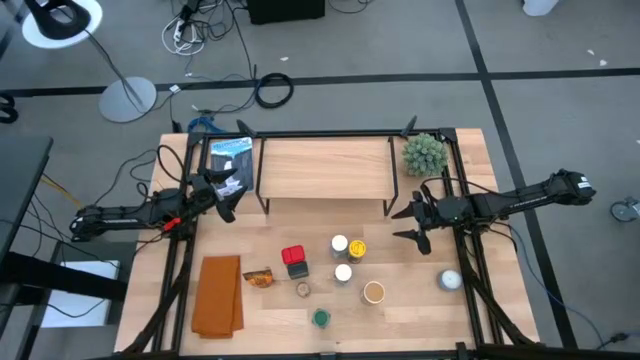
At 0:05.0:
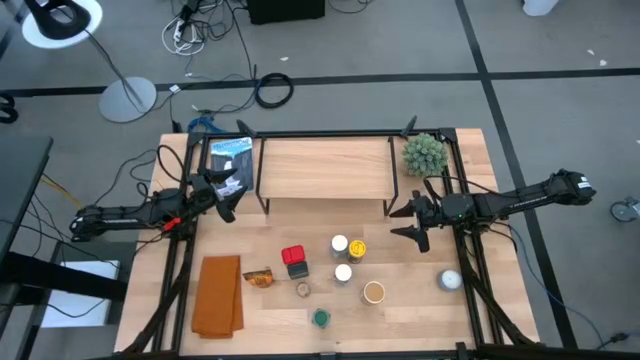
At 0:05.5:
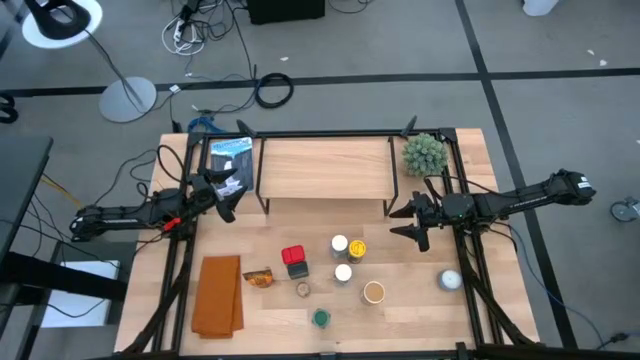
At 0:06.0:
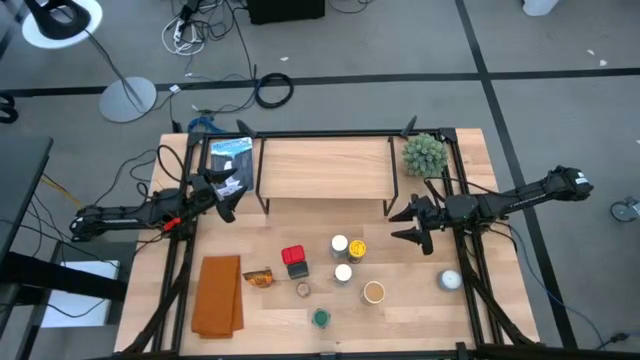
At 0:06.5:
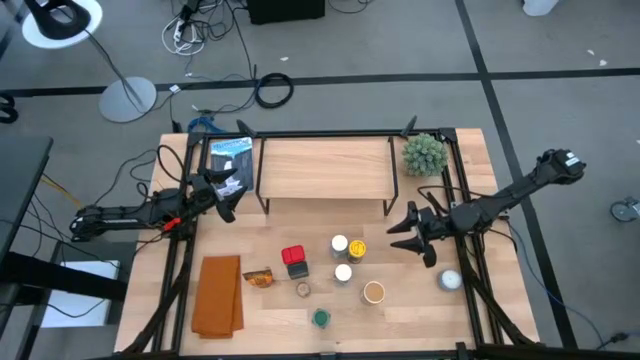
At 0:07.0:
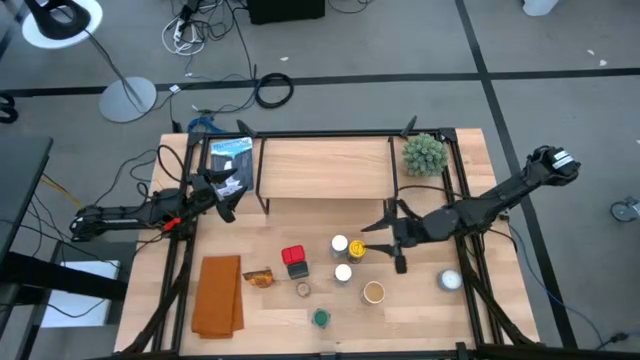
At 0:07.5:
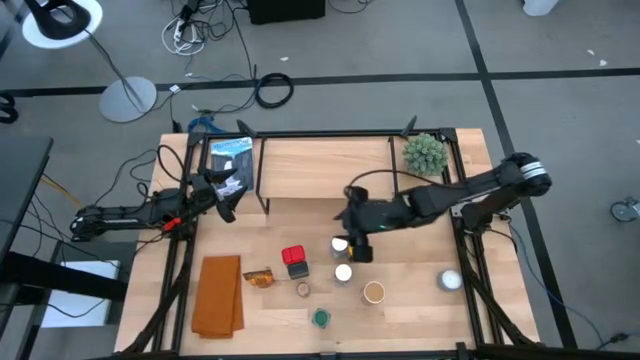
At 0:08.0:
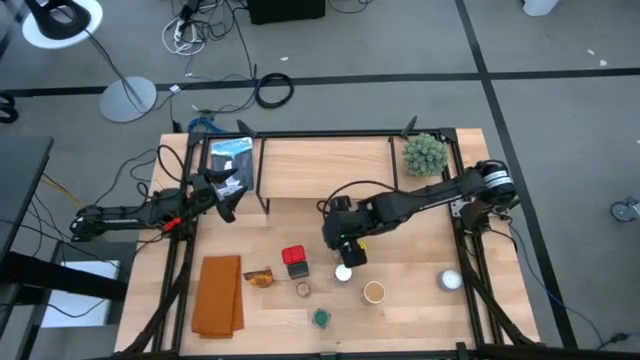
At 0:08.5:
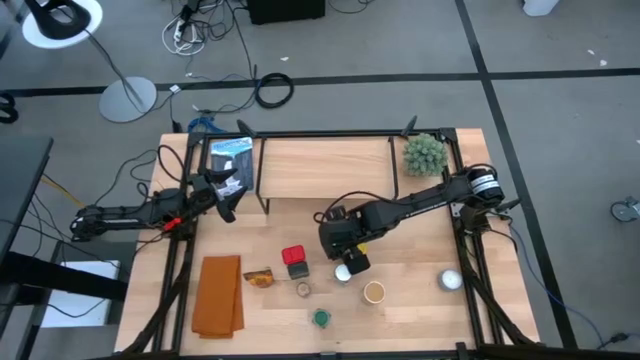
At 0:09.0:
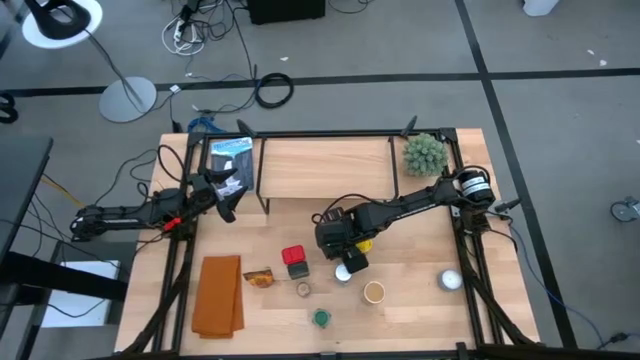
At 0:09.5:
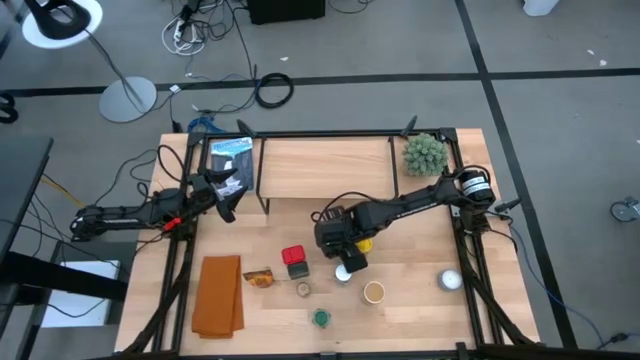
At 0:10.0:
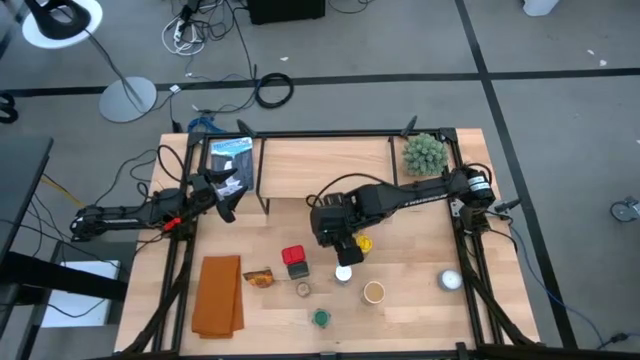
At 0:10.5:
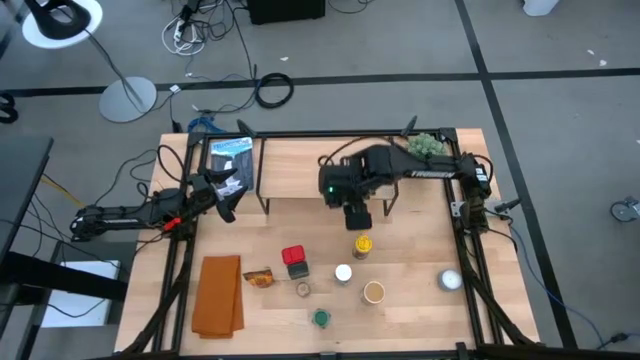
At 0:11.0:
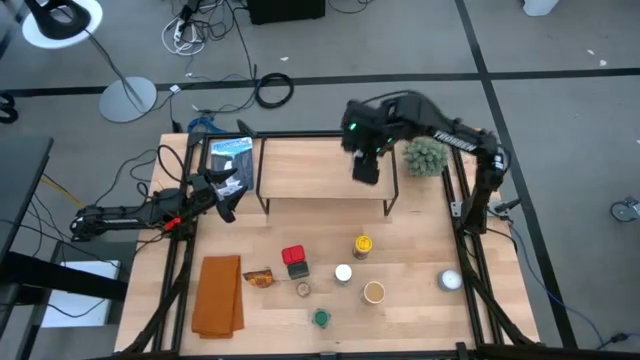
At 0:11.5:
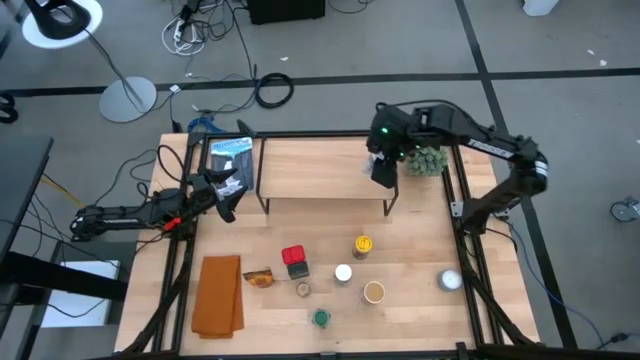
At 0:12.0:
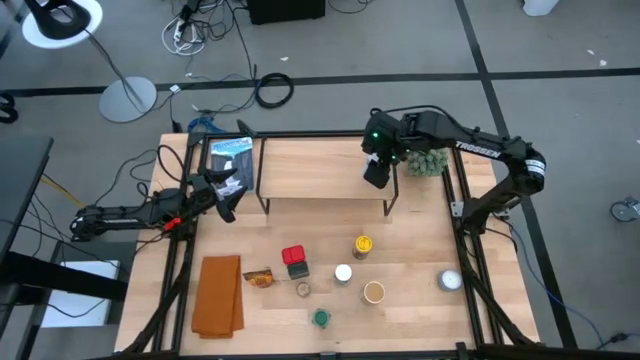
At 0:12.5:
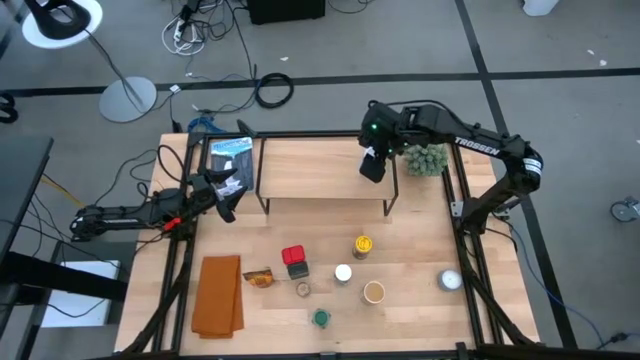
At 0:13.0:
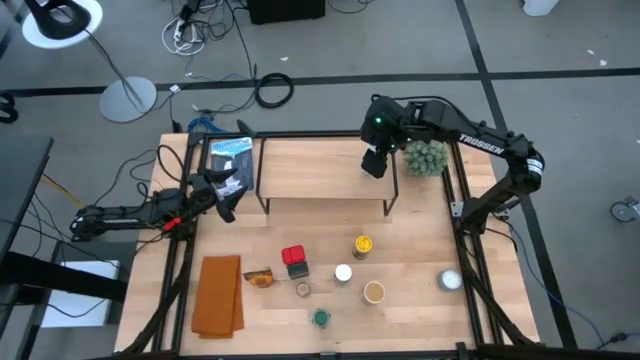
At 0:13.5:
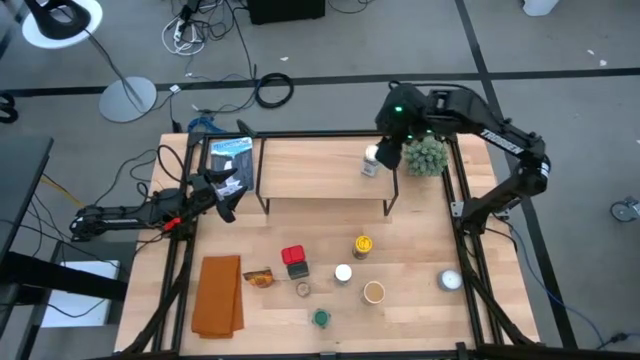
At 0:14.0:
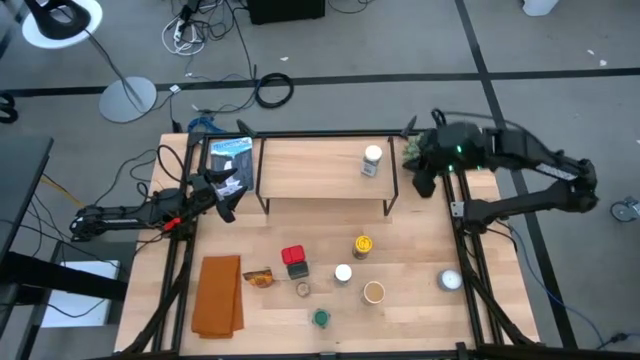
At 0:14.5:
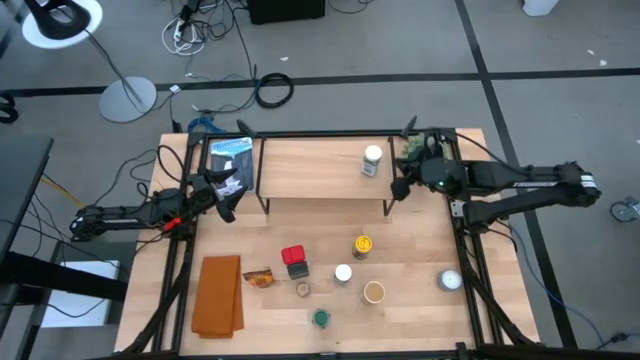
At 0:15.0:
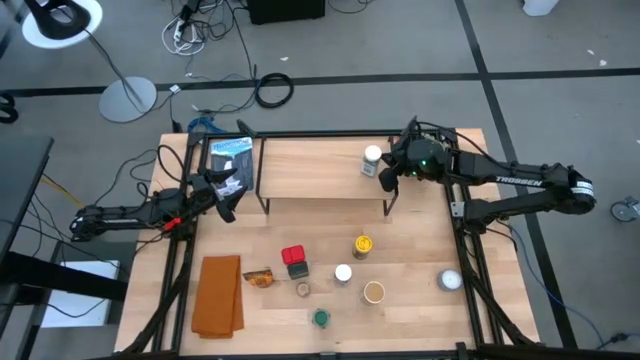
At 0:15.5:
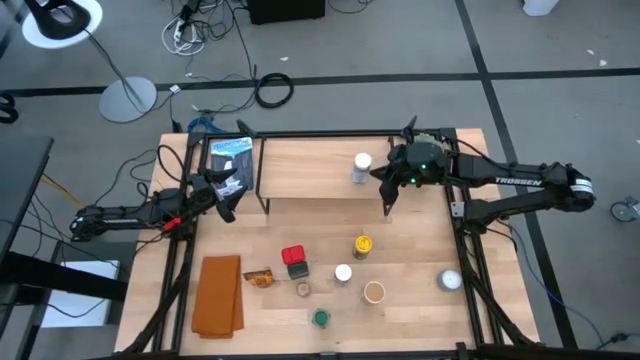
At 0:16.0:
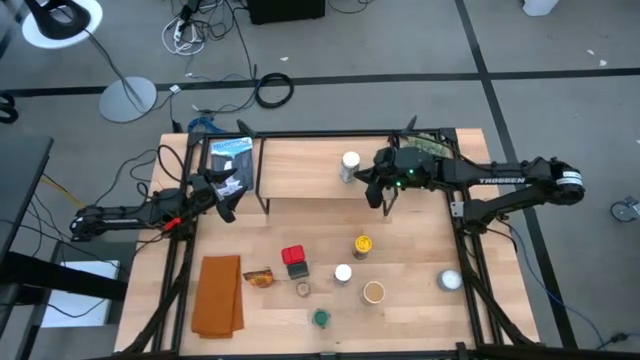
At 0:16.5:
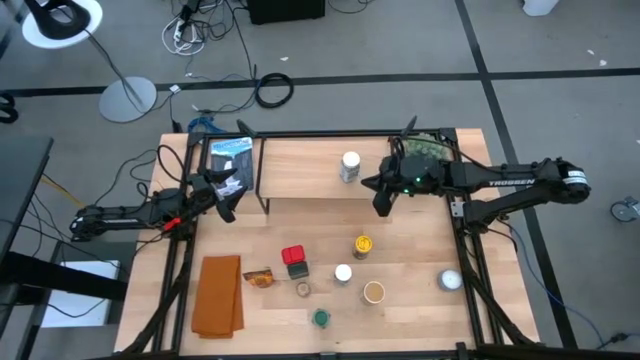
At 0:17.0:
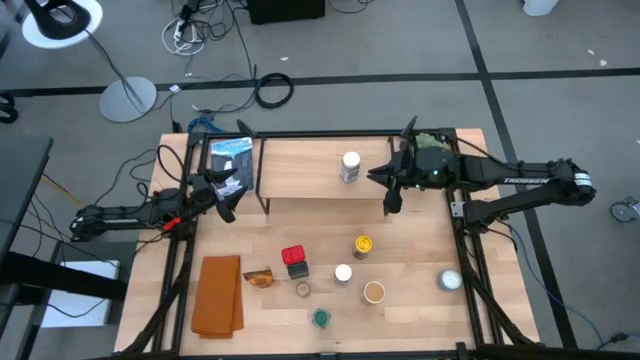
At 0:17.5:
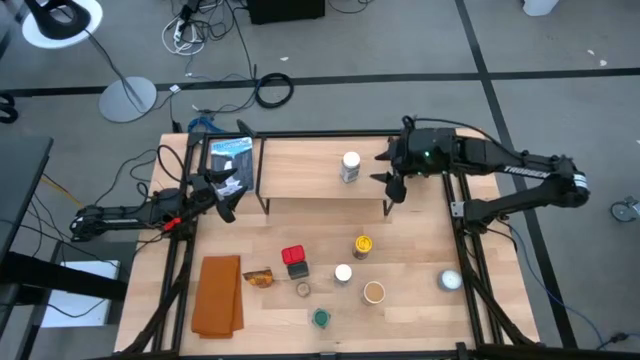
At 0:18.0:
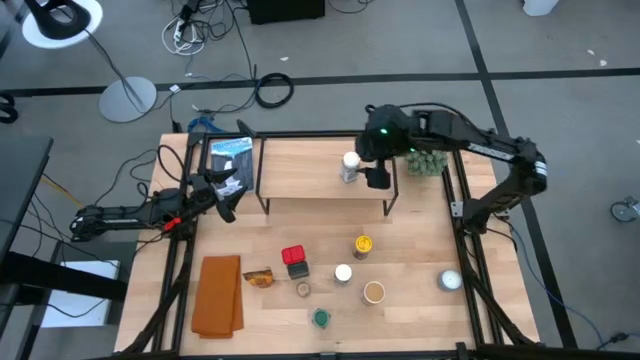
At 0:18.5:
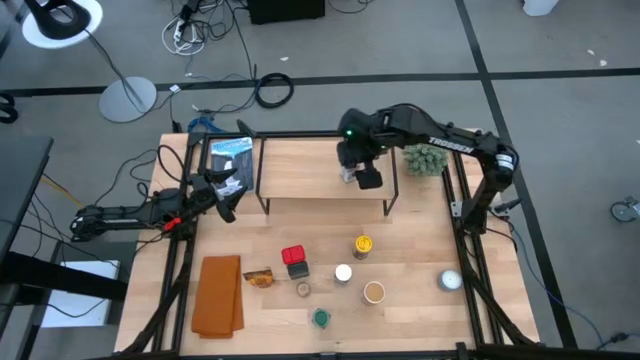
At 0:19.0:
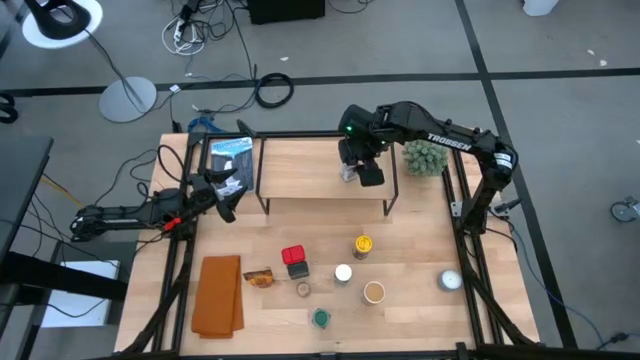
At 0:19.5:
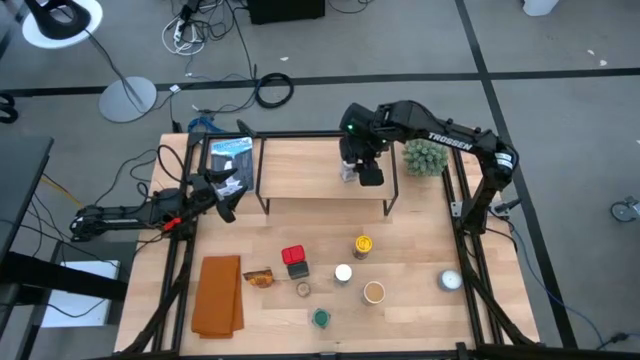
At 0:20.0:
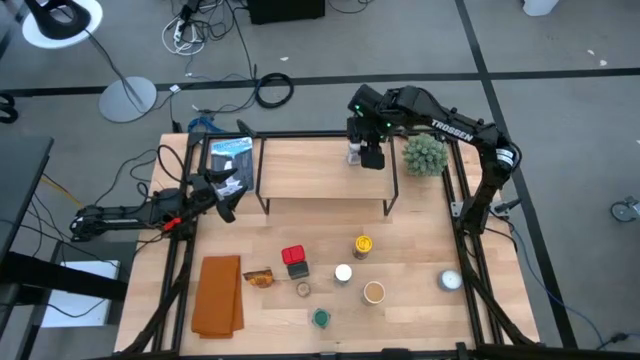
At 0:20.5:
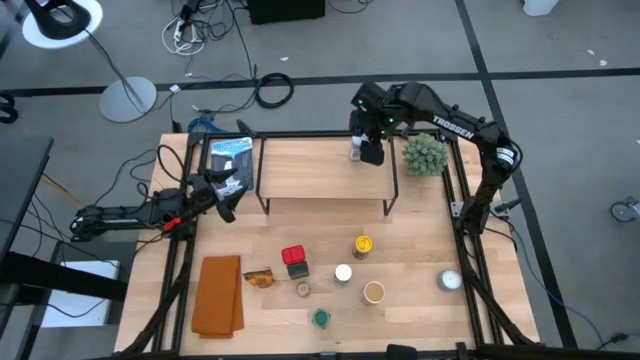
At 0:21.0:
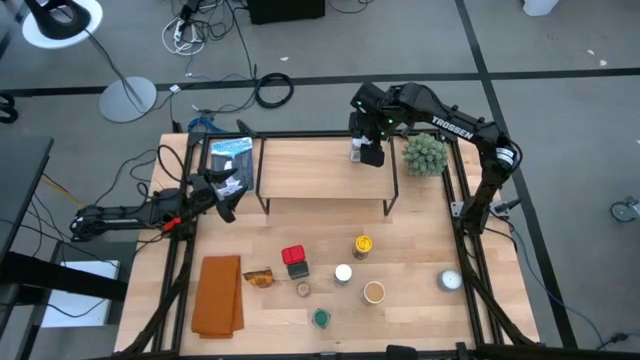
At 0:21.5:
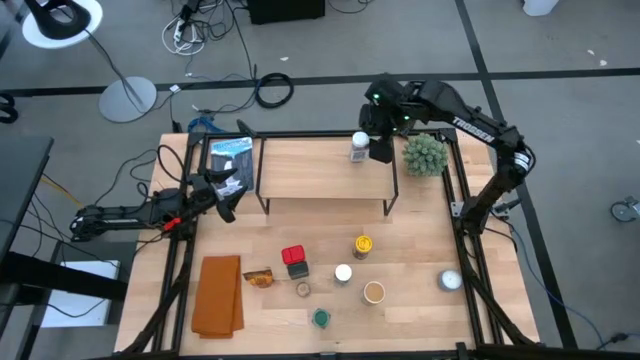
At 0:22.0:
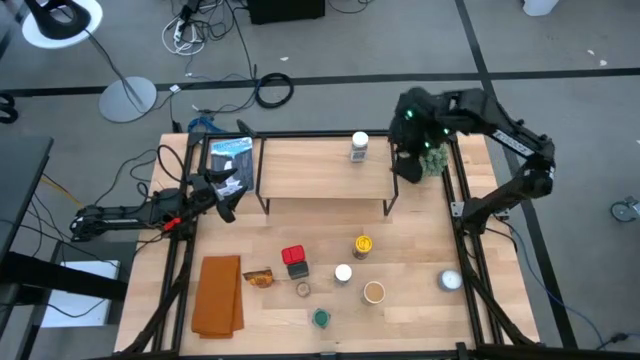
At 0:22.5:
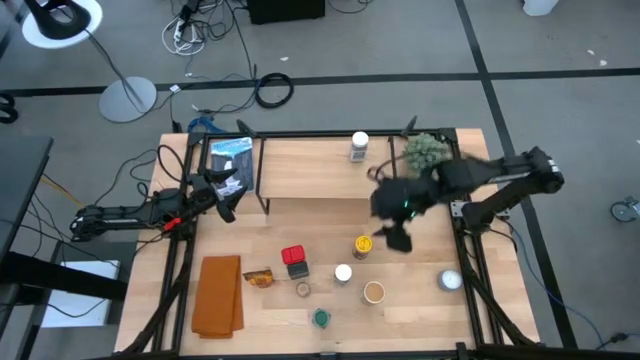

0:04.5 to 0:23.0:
Task: Shelf spices
Put the top white seasoning bottle on the shelf
